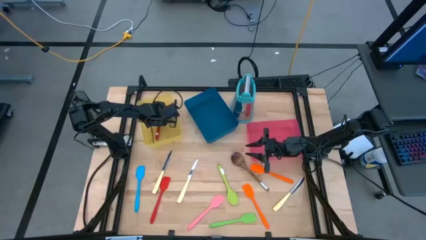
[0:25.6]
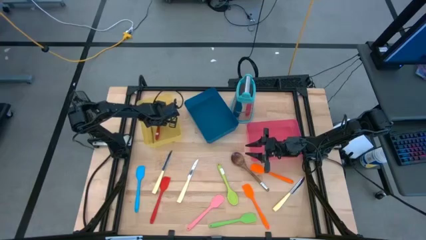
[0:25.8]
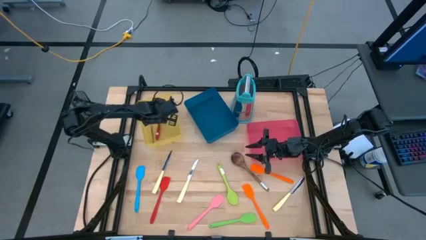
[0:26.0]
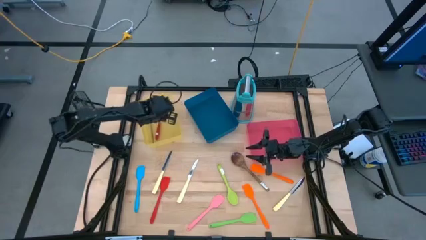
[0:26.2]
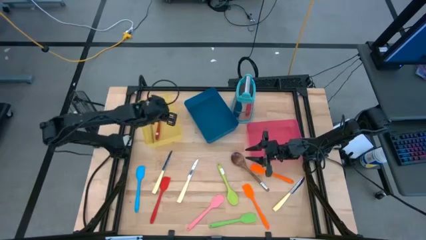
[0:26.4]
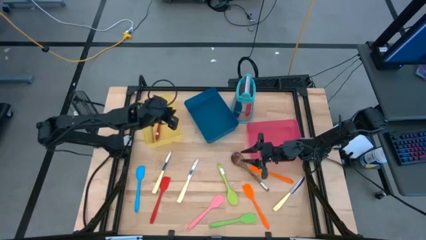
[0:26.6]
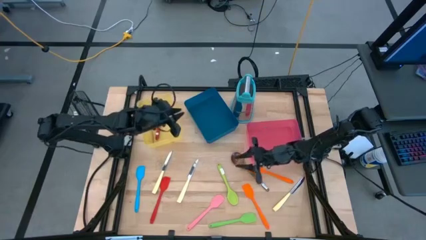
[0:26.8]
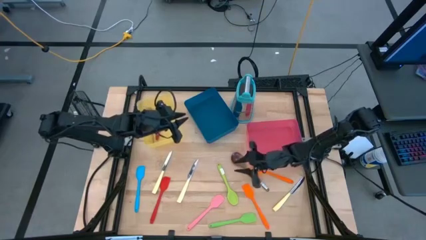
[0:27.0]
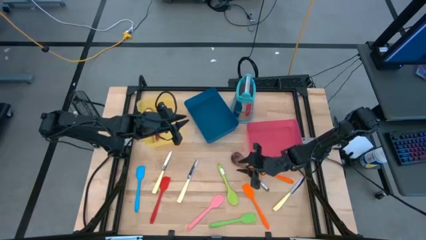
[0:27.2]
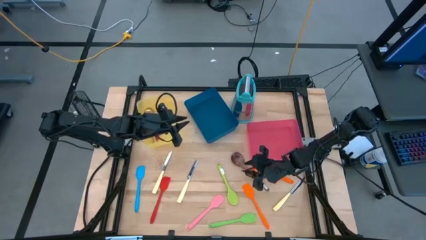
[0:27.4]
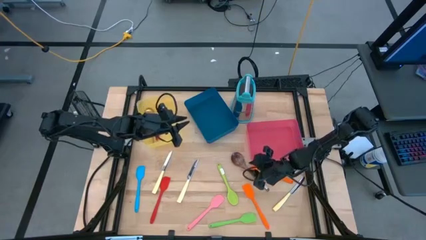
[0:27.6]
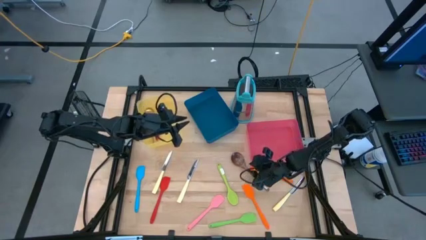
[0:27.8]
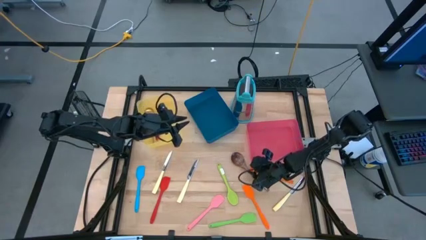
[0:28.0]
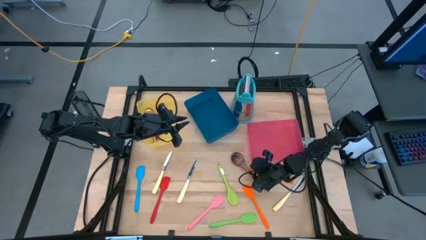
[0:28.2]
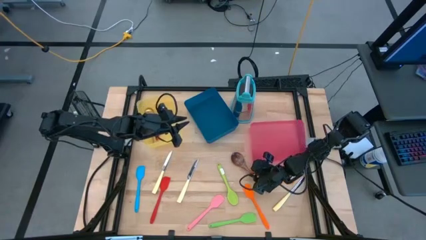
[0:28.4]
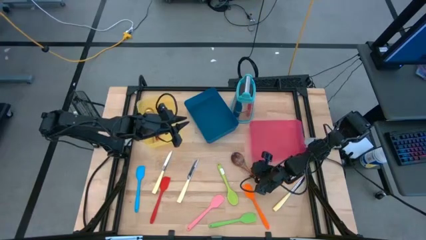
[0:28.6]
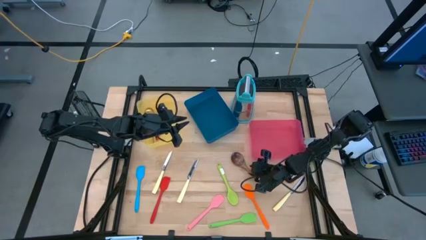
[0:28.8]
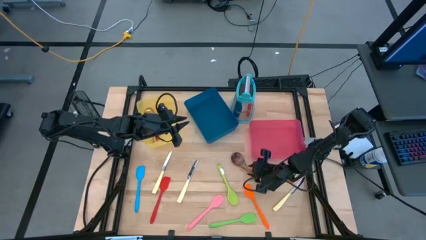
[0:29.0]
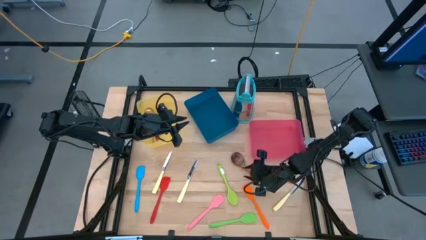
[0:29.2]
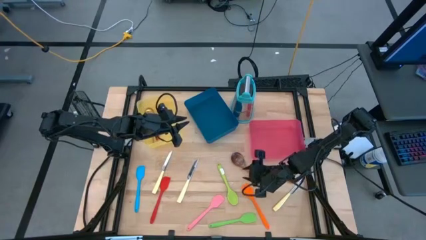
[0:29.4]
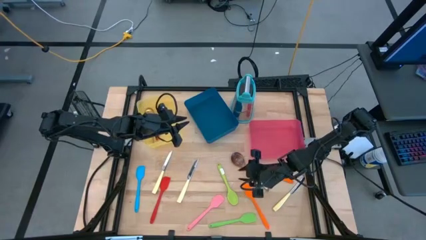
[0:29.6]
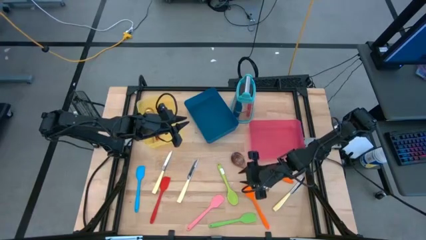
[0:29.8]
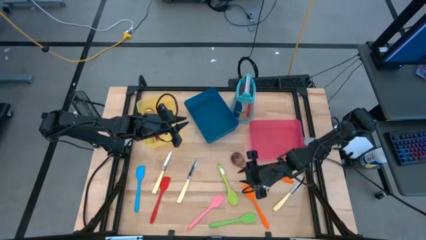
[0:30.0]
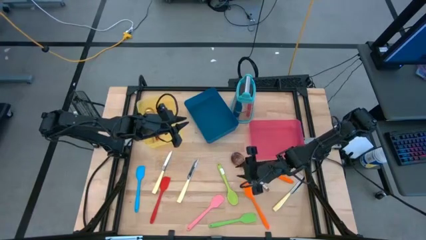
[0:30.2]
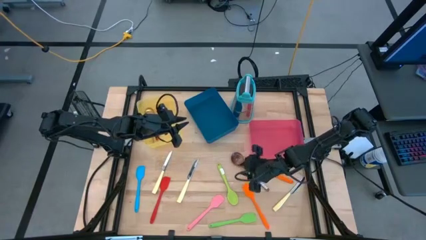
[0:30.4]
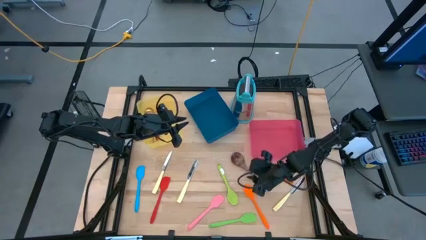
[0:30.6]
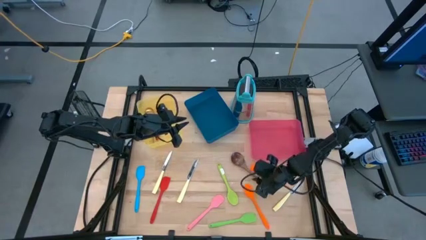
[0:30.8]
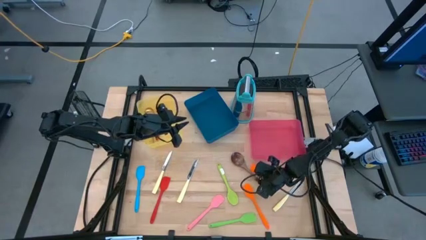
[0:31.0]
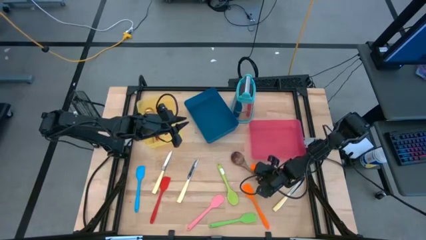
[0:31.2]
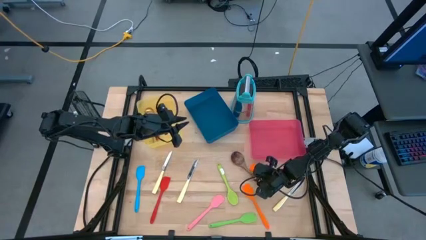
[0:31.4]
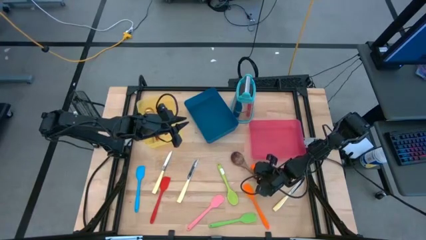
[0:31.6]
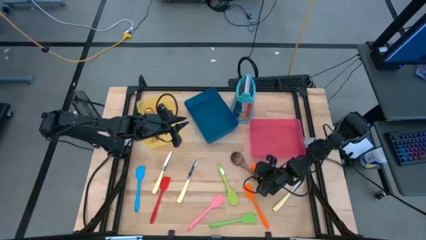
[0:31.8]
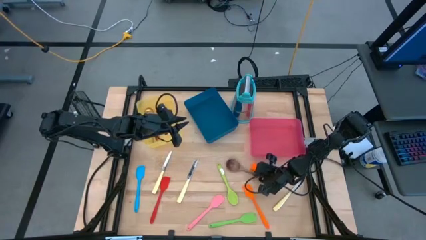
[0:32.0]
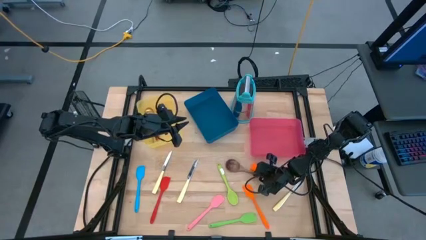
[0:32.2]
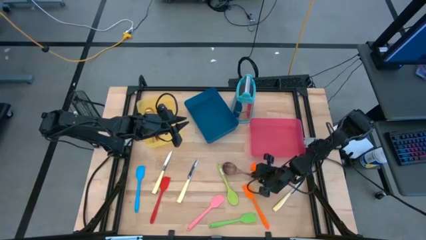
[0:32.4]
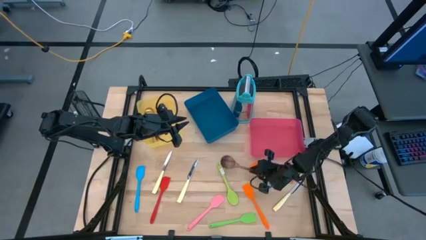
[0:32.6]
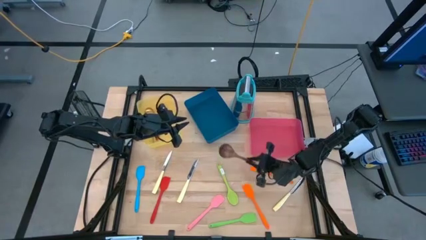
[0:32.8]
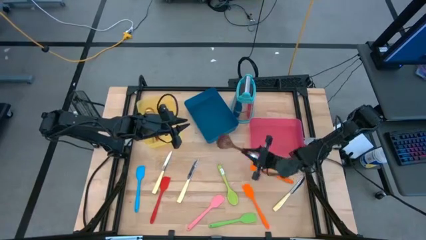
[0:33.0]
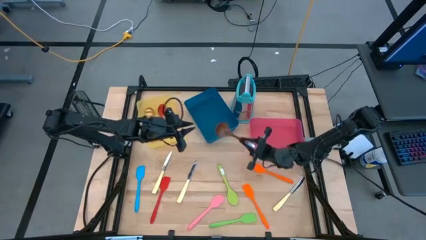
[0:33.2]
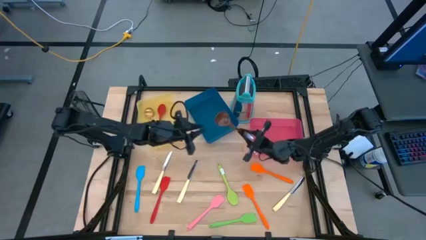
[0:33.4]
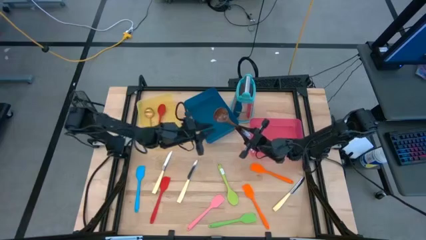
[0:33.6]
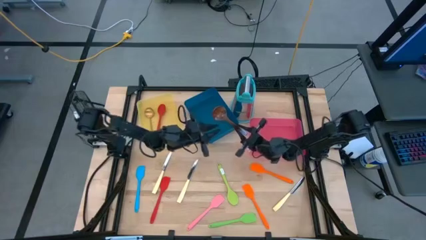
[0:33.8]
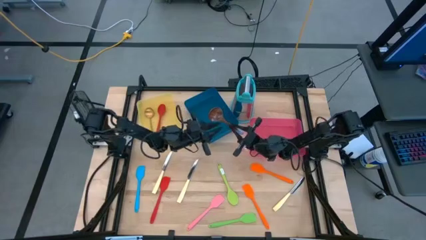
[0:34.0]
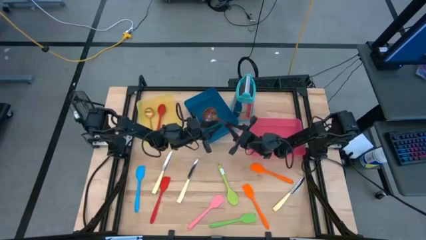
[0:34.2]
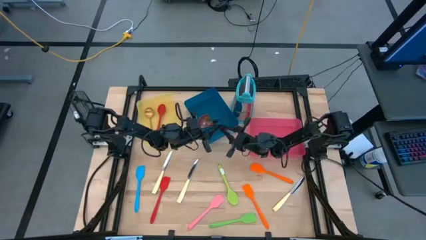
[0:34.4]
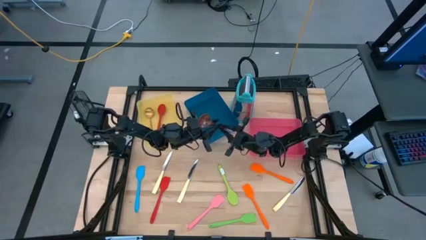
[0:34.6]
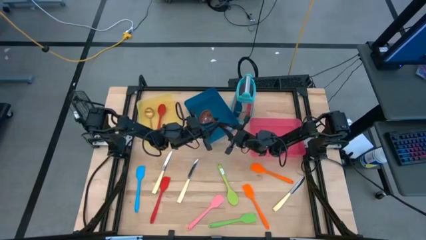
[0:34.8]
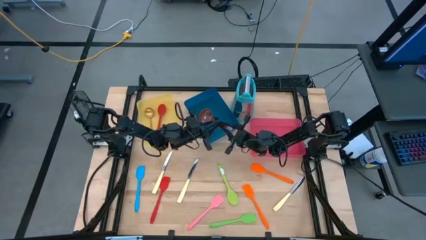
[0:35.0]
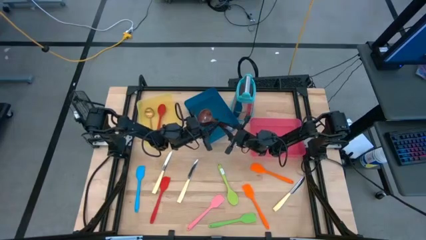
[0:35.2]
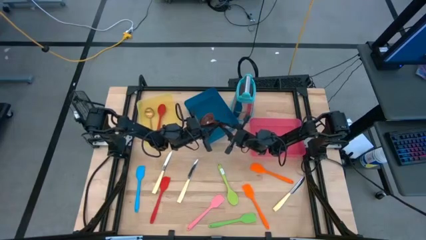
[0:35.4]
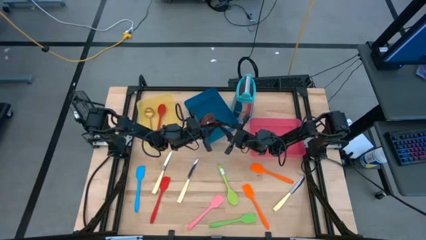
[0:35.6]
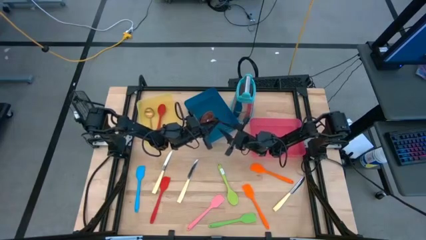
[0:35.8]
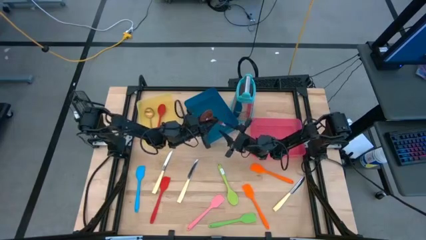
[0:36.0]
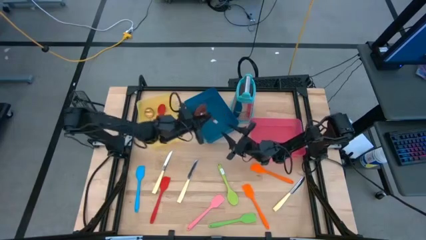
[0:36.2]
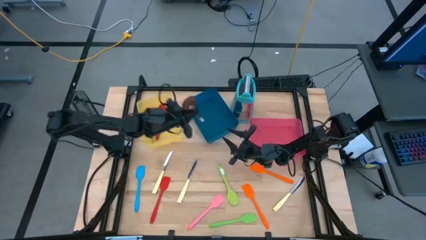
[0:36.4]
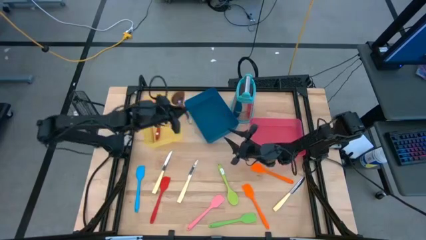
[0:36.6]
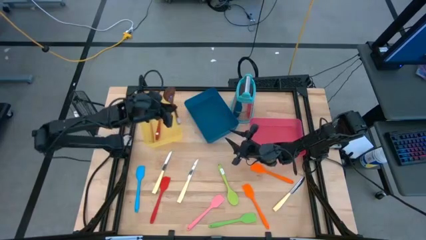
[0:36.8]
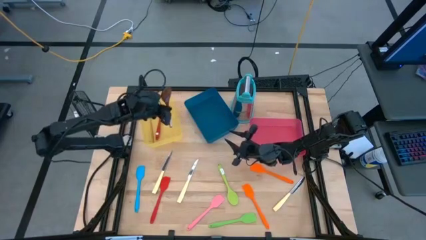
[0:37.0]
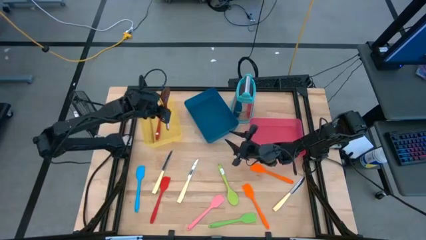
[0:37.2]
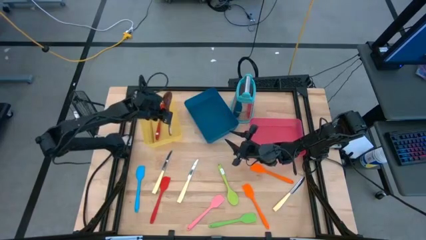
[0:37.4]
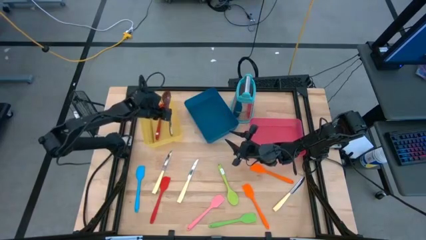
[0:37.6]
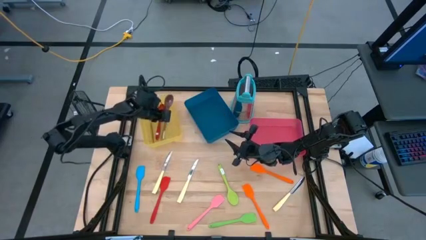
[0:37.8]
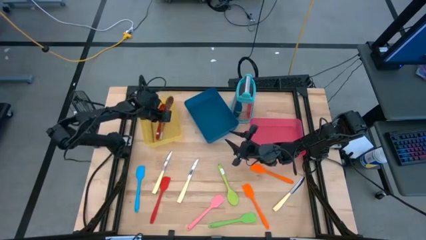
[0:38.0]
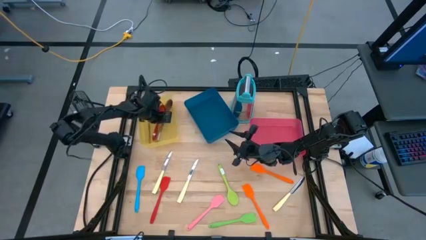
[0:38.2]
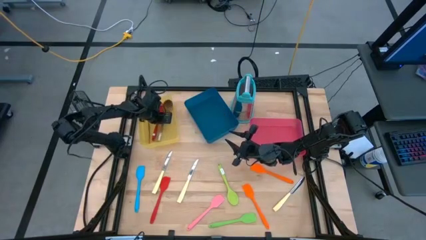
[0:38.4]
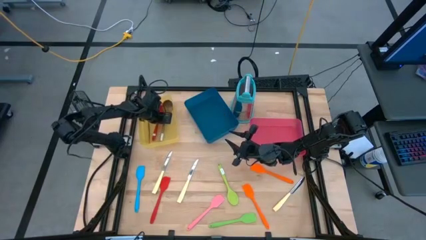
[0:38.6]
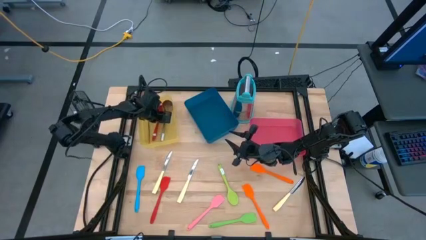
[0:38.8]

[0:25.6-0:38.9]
Task: Pick & Place Kitchen Items
Put the brown serving spoon into the yellow bin

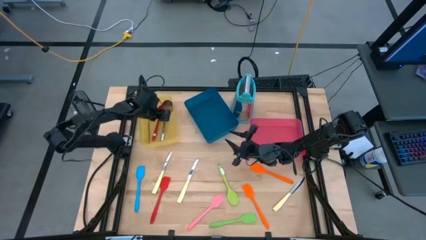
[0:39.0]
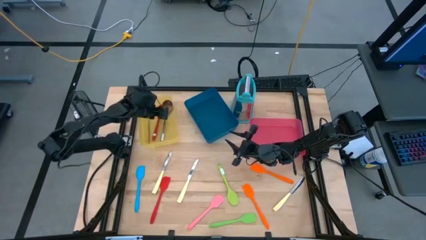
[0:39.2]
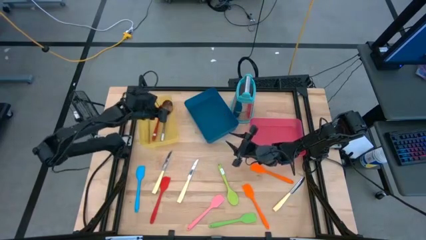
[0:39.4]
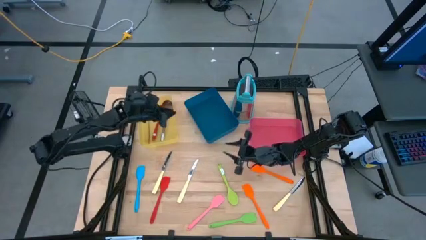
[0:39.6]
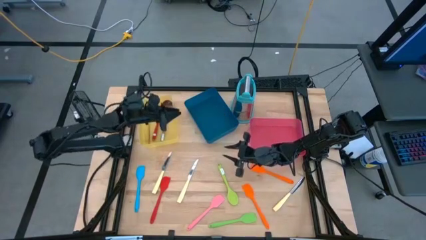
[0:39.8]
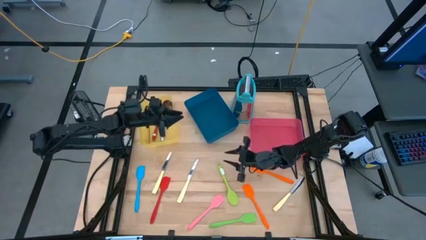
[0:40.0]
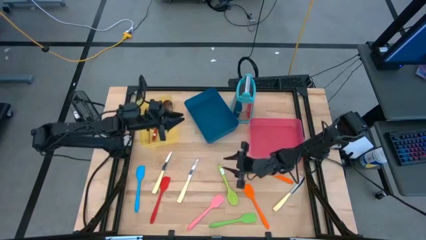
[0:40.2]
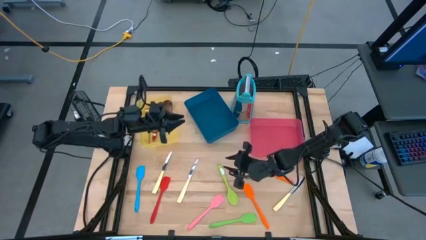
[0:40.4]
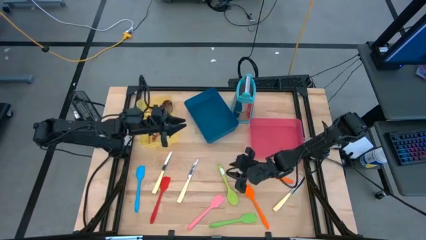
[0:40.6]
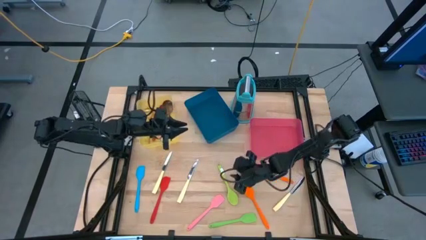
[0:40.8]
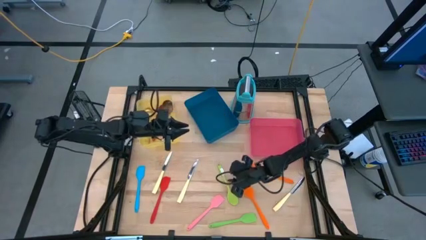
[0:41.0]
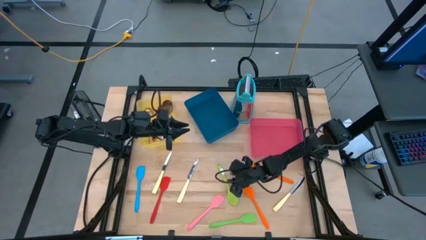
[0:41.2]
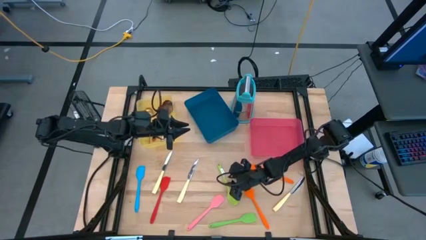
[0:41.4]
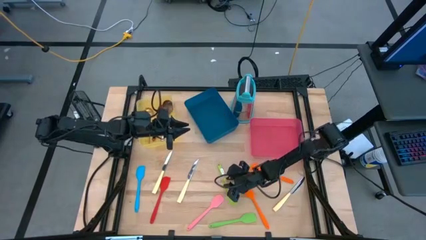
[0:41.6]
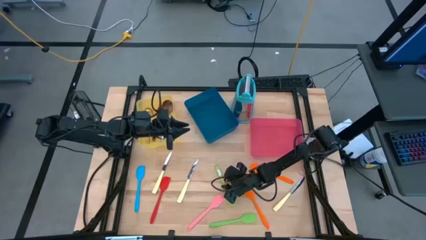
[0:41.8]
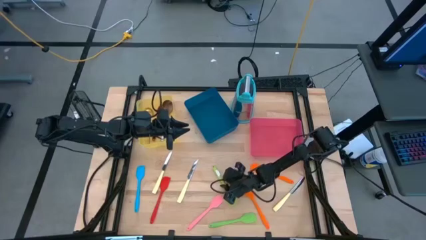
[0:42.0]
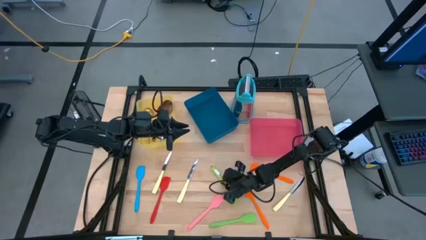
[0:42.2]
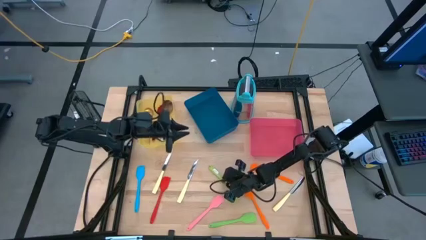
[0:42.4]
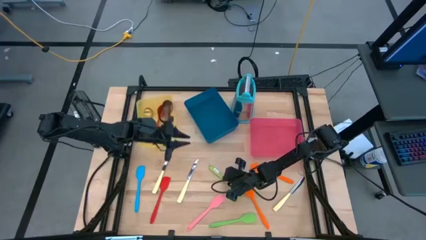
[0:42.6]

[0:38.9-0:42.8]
Put the green serving spoon into the yellow bin
